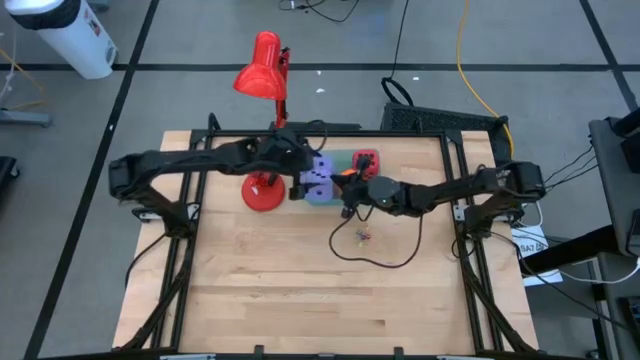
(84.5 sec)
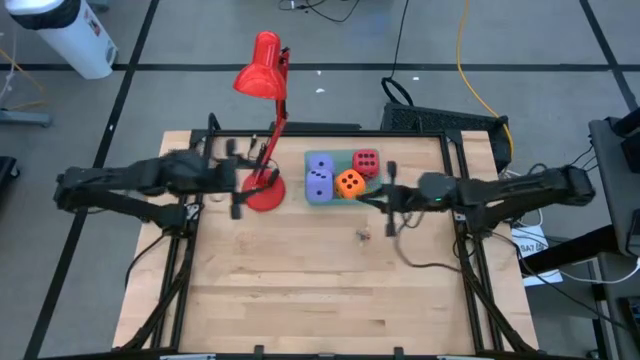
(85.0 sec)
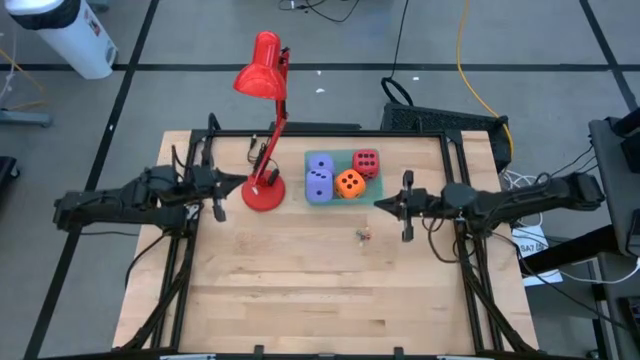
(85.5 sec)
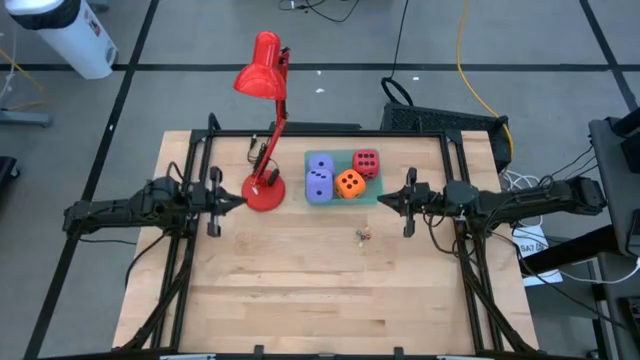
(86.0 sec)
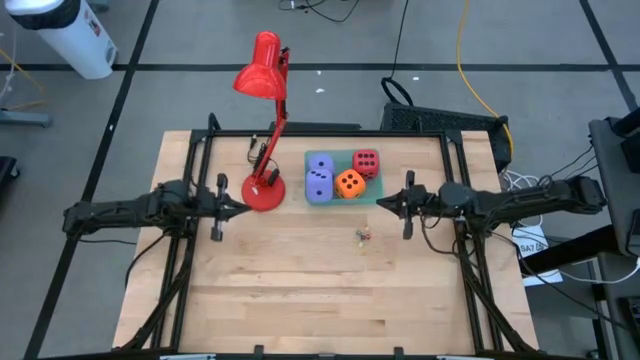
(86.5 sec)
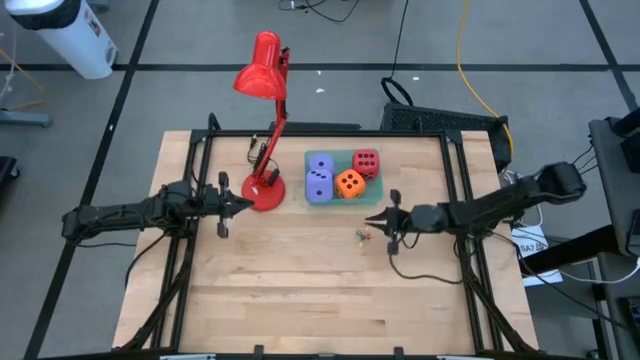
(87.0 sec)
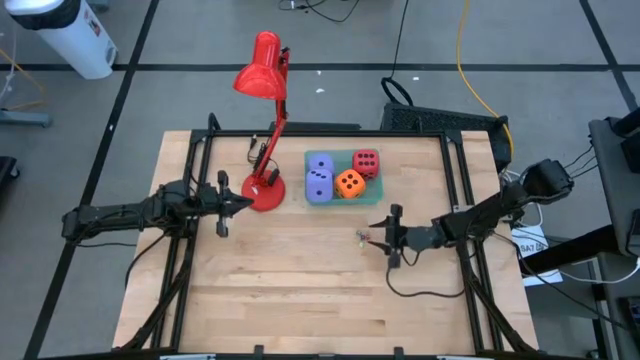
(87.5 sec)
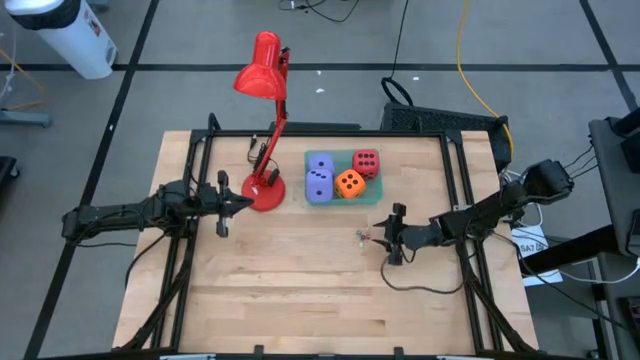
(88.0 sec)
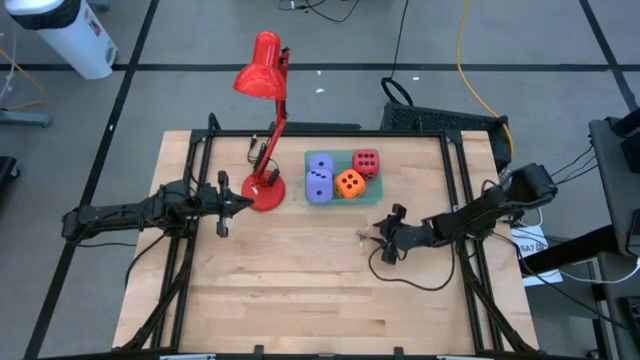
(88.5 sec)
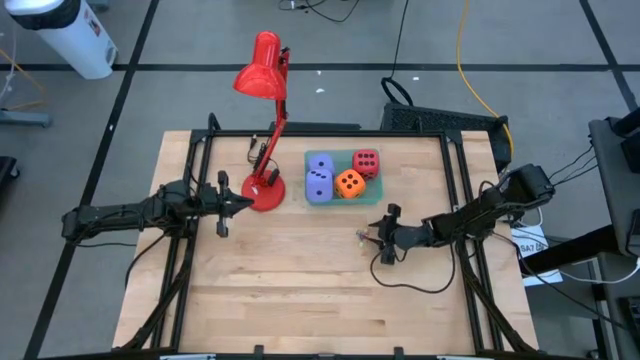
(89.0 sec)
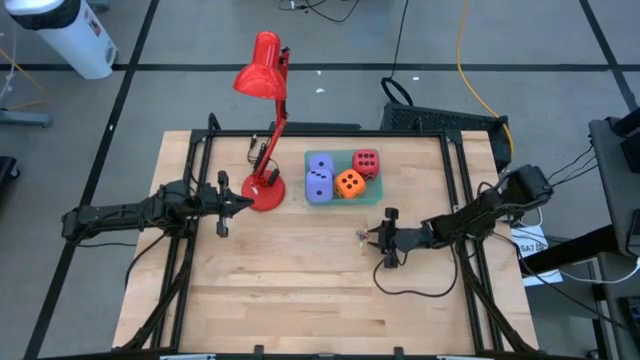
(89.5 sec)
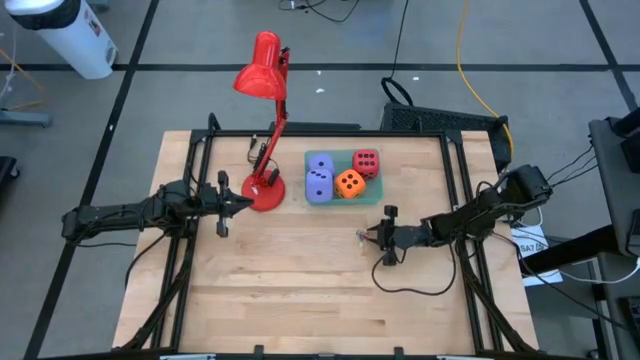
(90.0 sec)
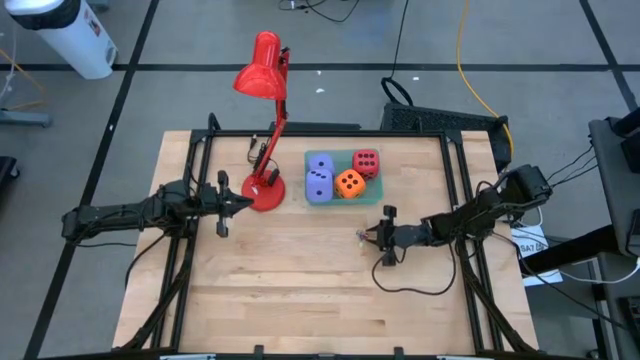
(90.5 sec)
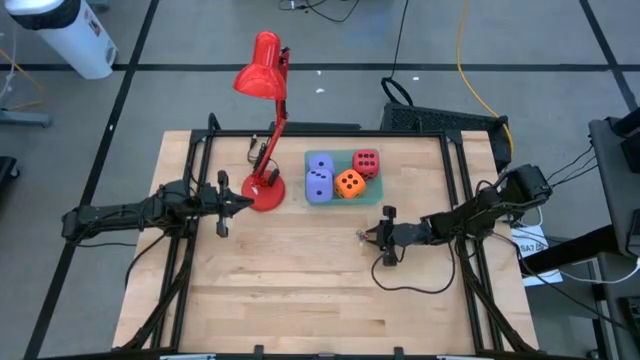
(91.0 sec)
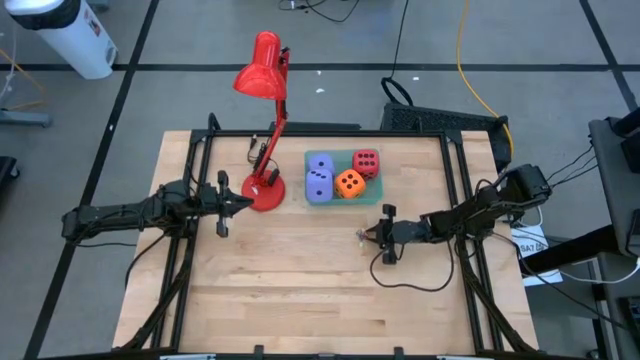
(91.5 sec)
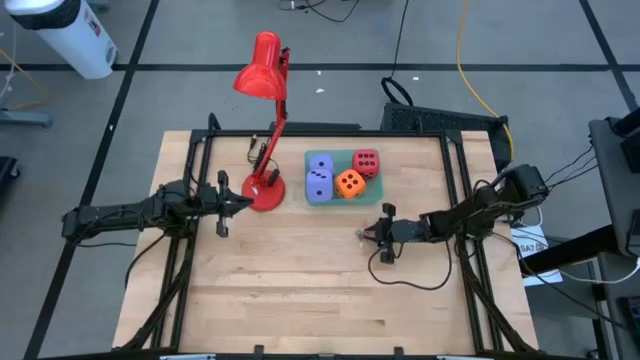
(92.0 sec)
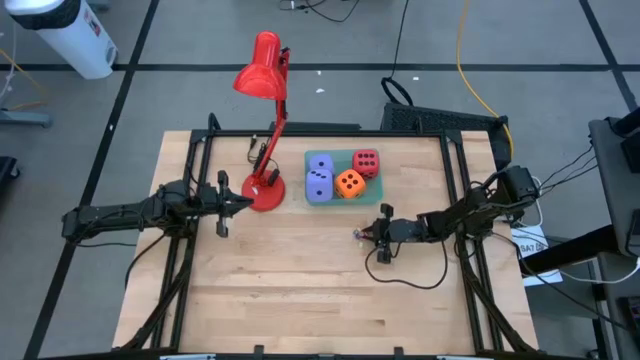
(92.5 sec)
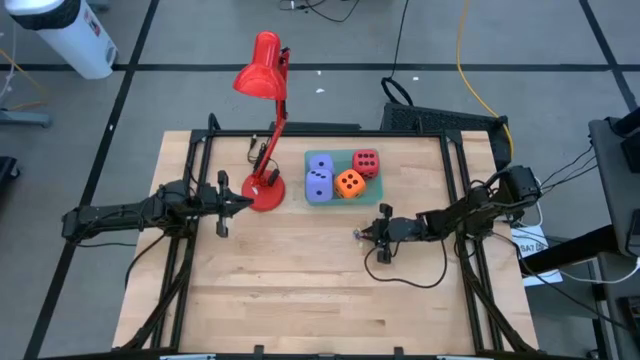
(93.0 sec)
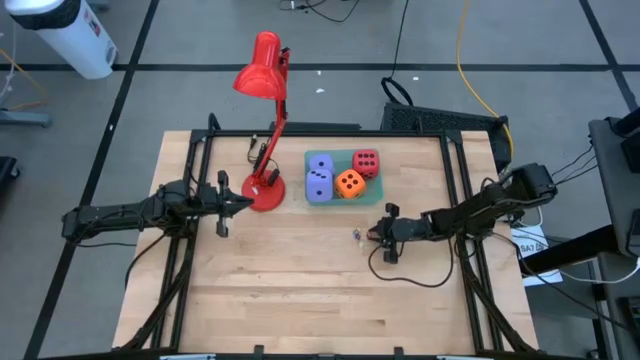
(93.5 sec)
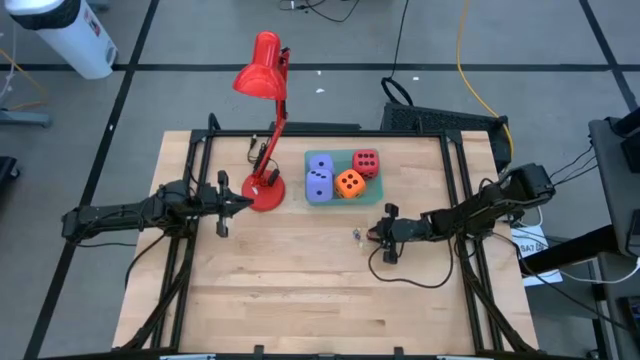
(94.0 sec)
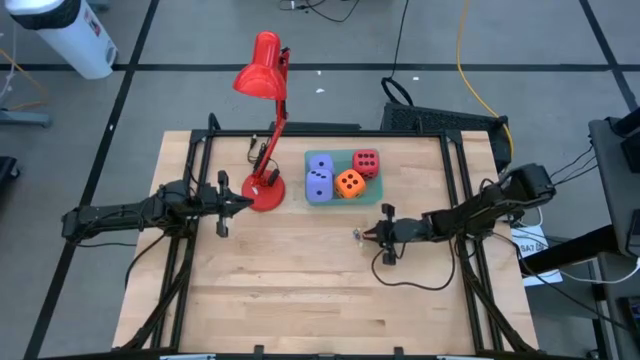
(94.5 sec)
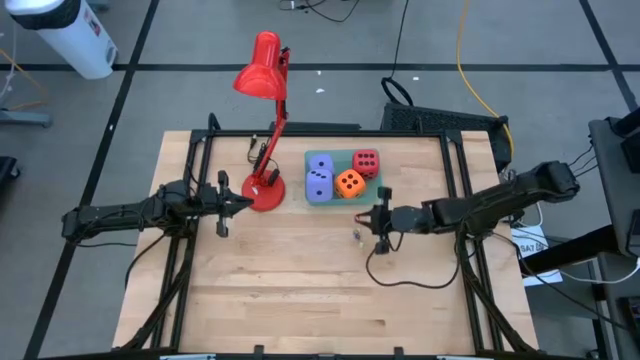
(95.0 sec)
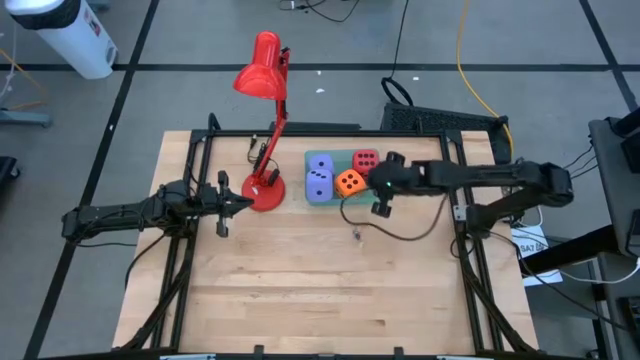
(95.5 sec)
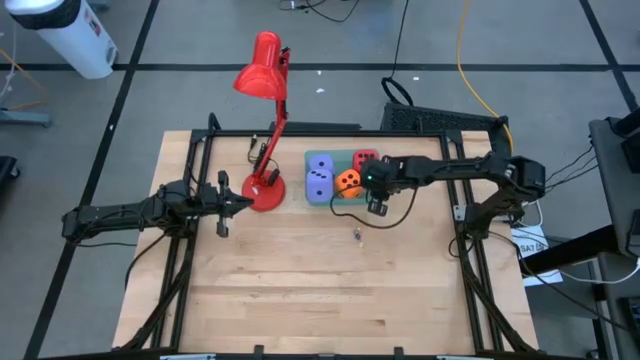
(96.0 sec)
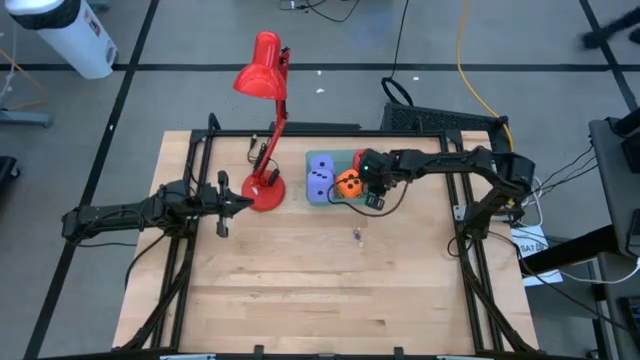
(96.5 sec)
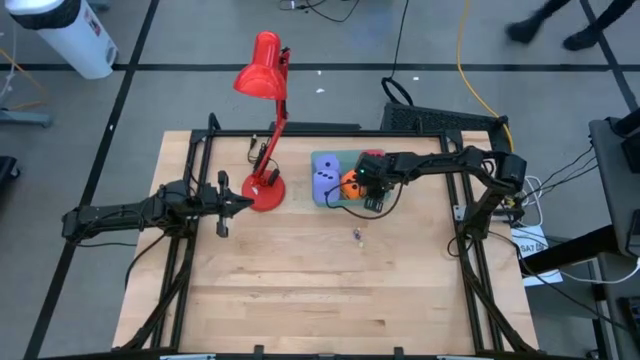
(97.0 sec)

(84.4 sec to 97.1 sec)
Task: Pick & Place Dice
Put the red die into the green bin

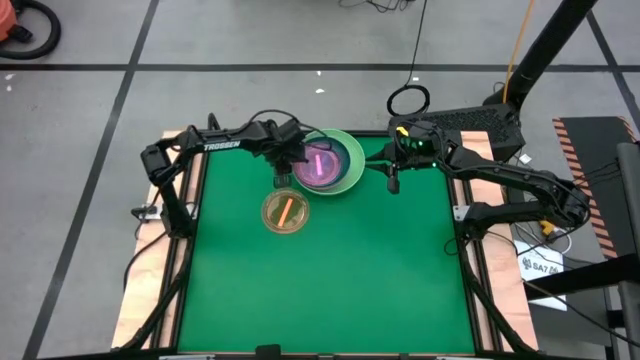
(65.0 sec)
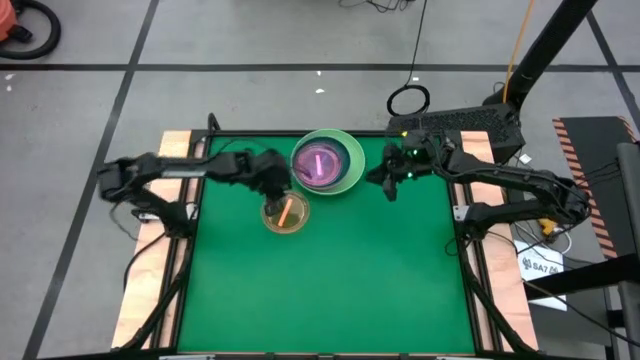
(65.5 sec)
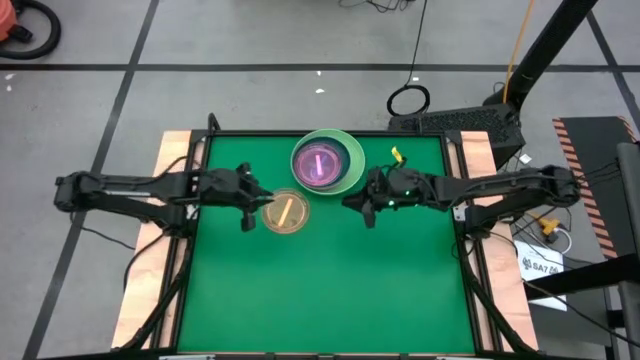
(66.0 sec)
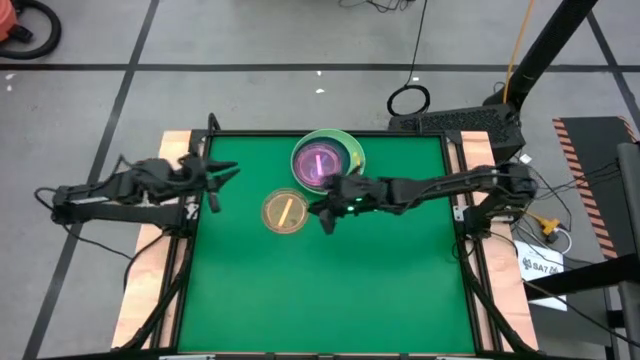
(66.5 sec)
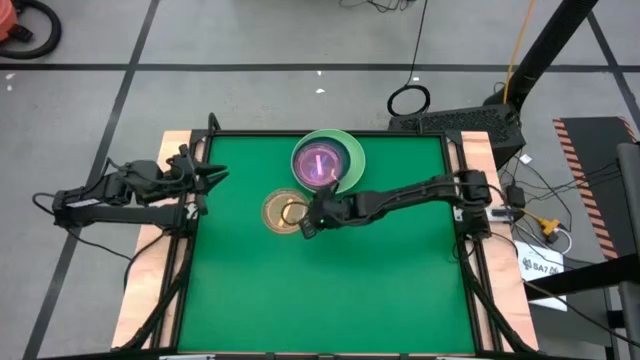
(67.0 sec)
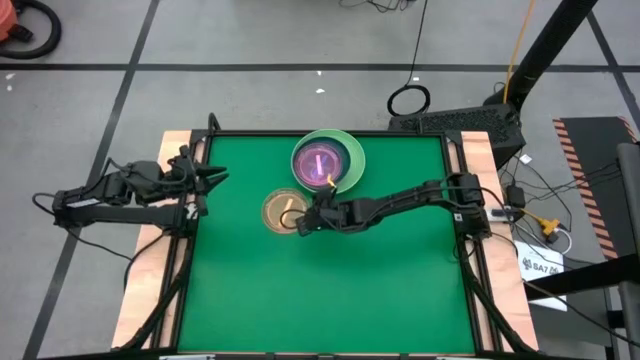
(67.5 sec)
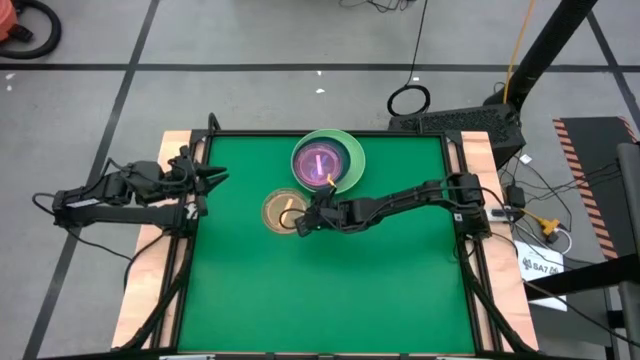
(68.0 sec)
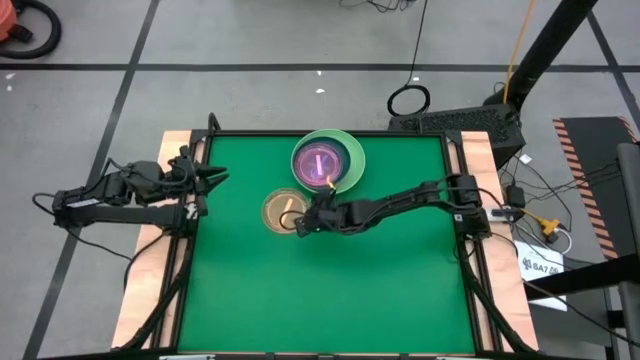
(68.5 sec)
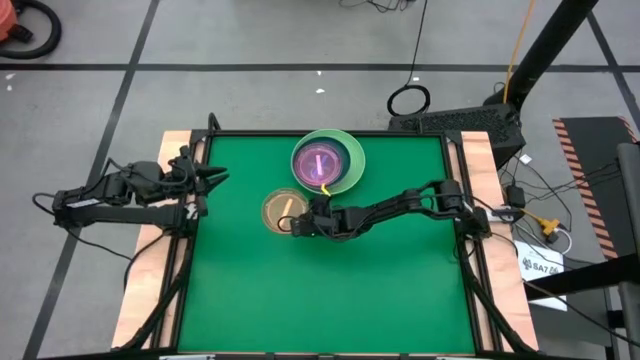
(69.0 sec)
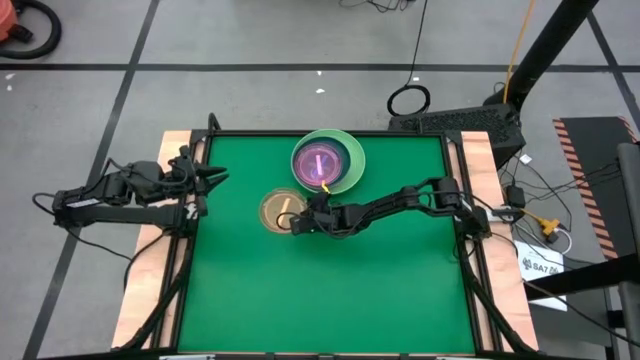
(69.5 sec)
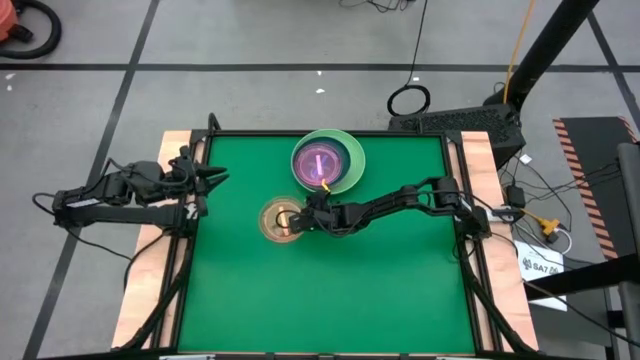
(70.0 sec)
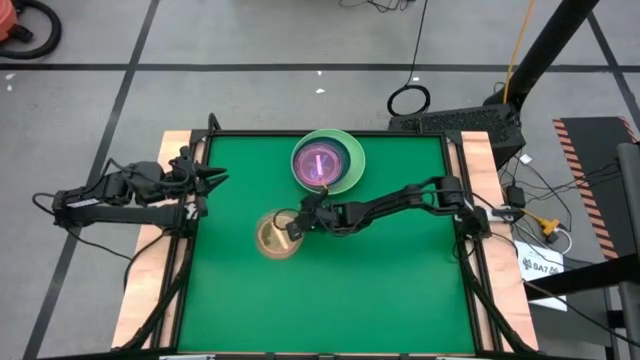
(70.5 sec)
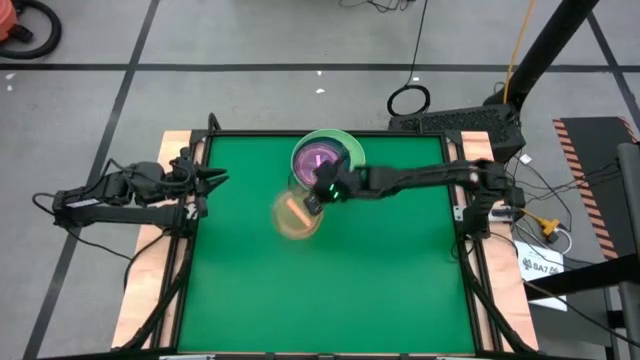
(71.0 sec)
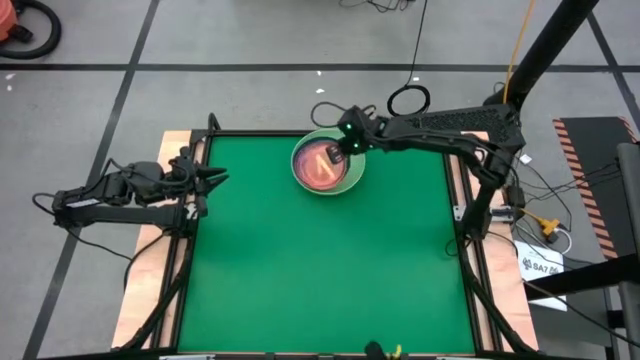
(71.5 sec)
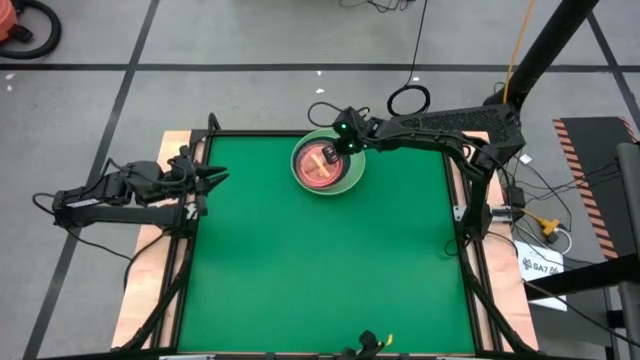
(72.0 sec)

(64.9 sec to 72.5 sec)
Task: Stack plastic plates
Stack the orange transparent plate on the pink transparent plate
